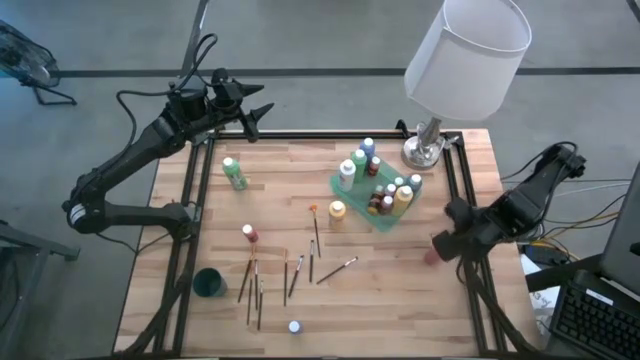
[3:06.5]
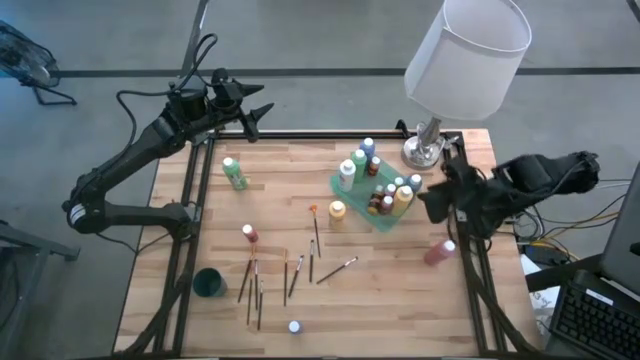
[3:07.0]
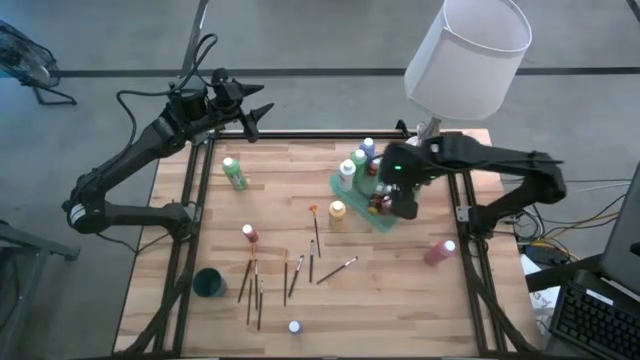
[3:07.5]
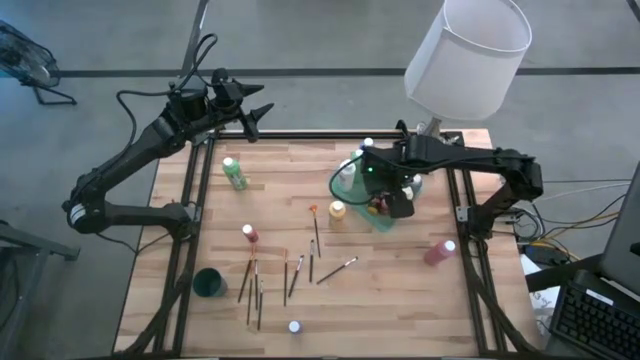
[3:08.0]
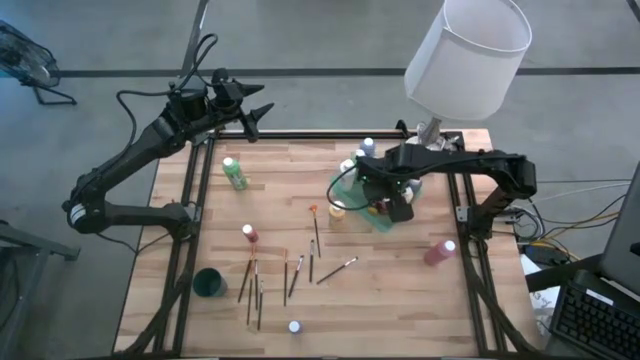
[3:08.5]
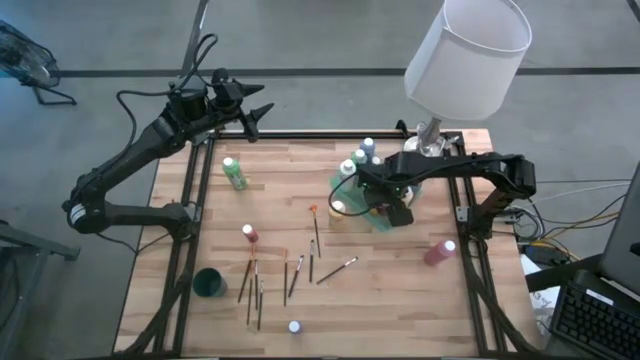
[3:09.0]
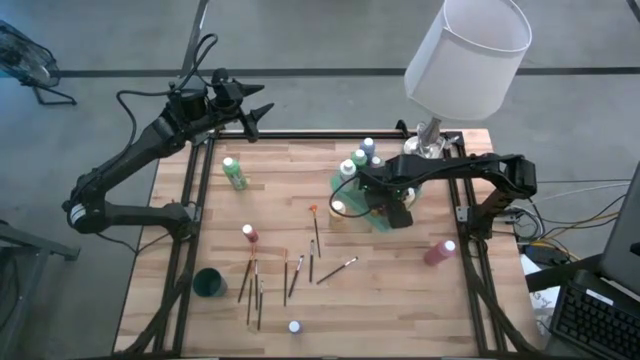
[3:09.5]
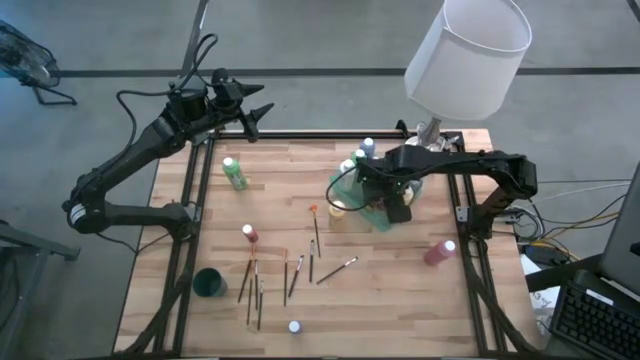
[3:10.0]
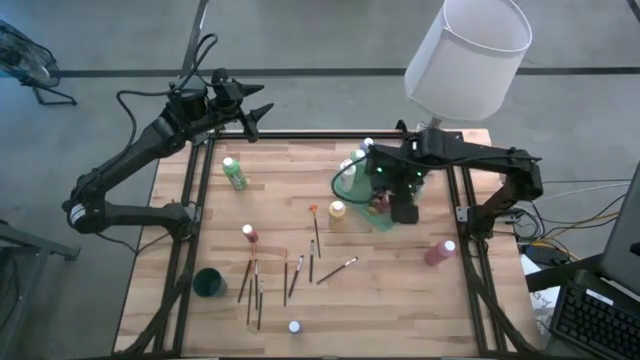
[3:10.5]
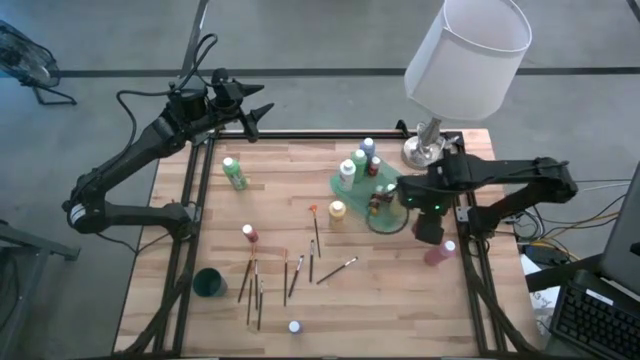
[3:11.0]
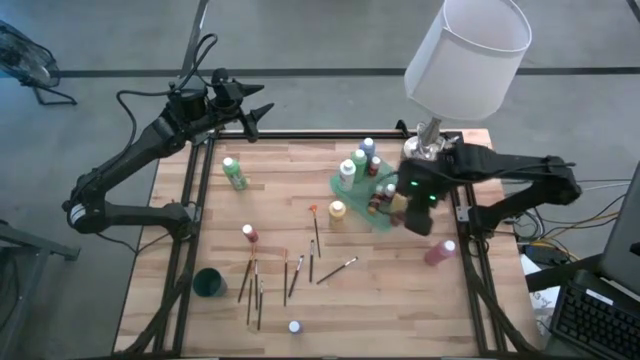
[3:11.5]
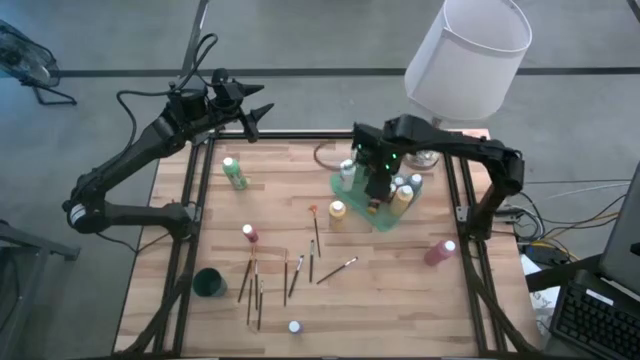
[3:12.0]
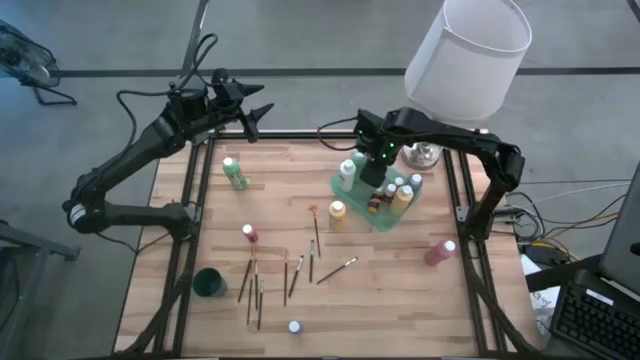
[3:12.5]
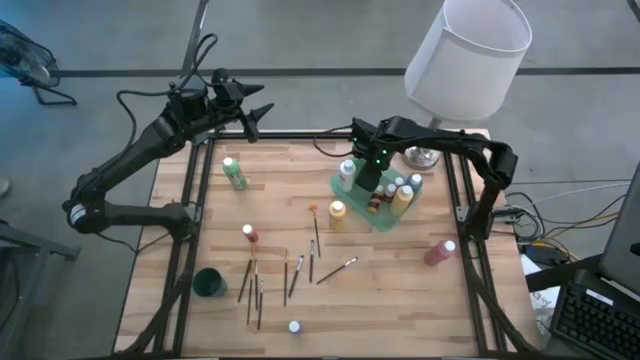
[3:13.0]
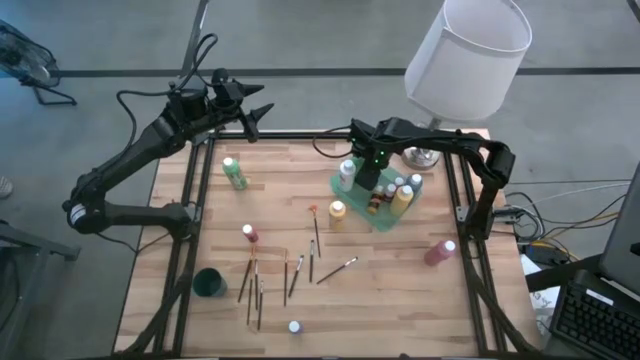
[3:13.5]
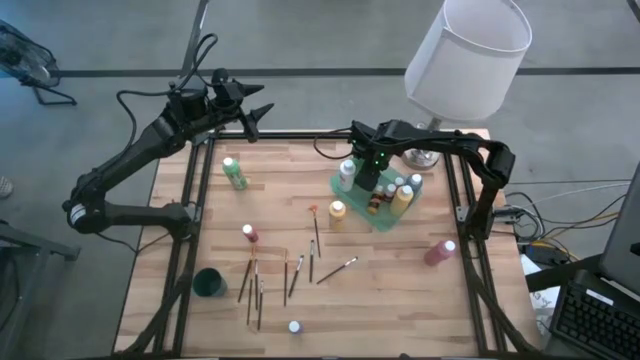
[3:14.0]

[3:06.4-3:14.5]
Task: Pick & Place Paint Supplies
Adjust the small red paint bottle in the green bin

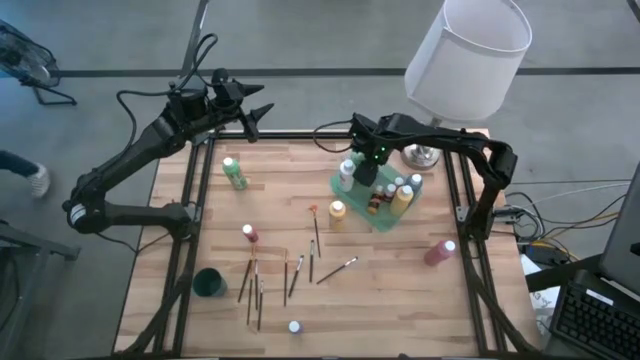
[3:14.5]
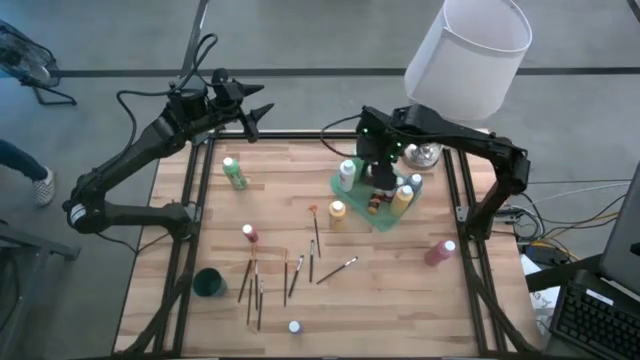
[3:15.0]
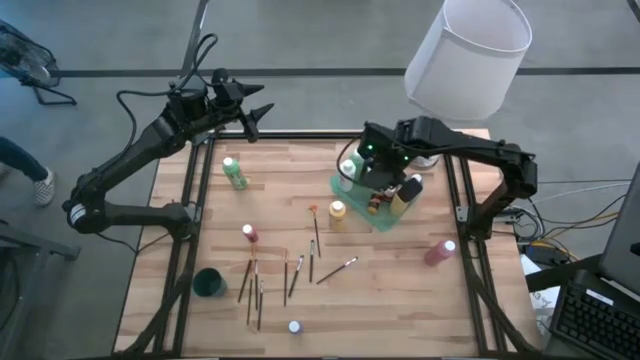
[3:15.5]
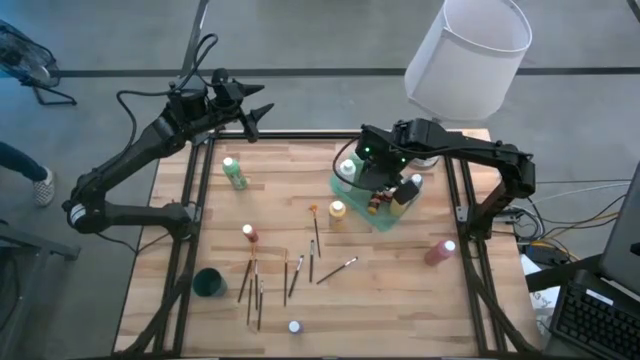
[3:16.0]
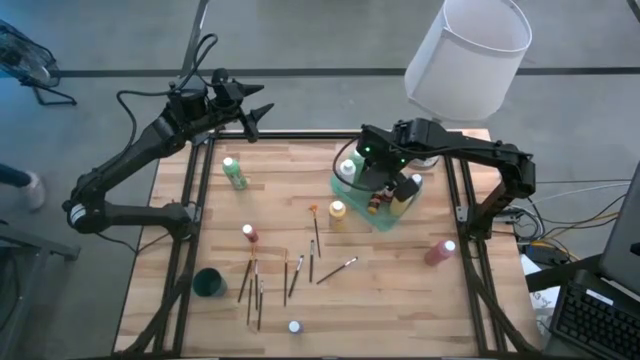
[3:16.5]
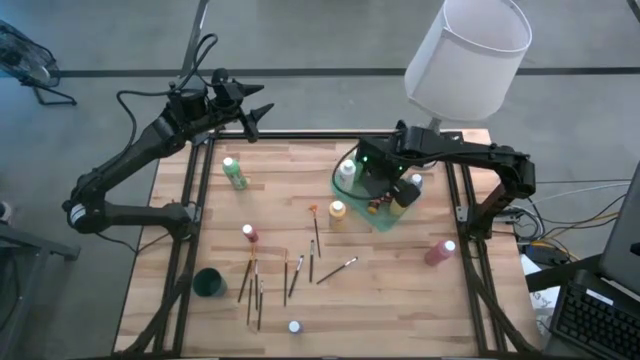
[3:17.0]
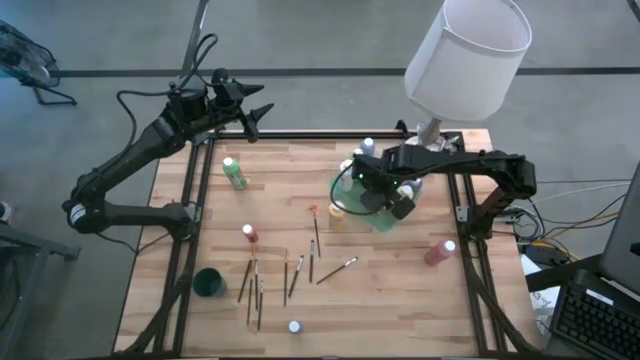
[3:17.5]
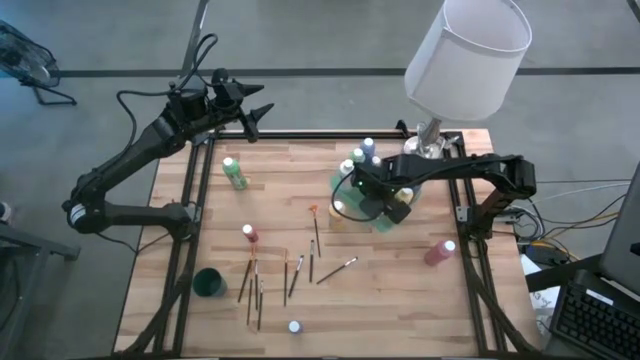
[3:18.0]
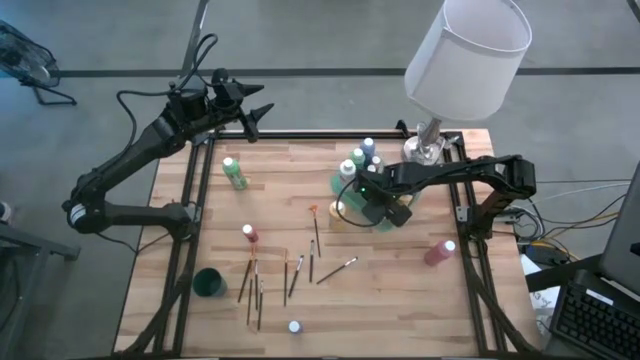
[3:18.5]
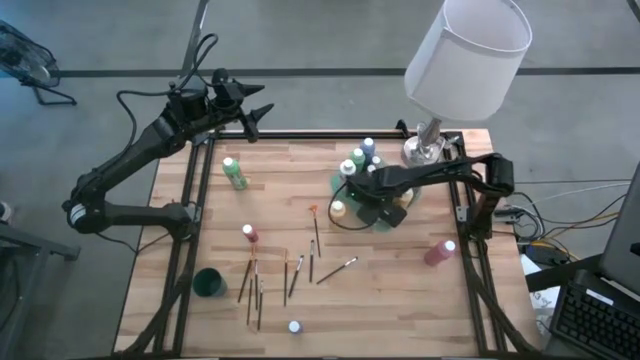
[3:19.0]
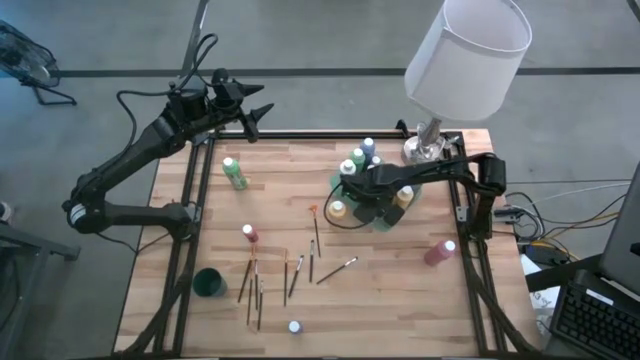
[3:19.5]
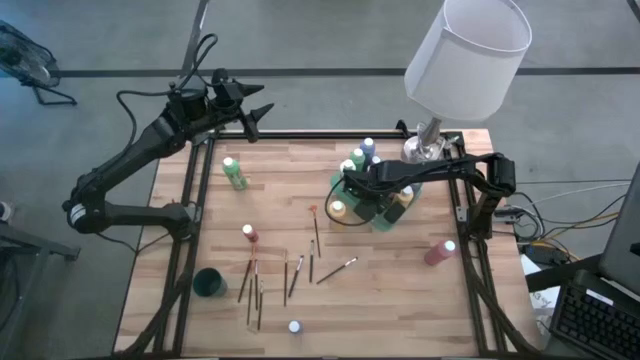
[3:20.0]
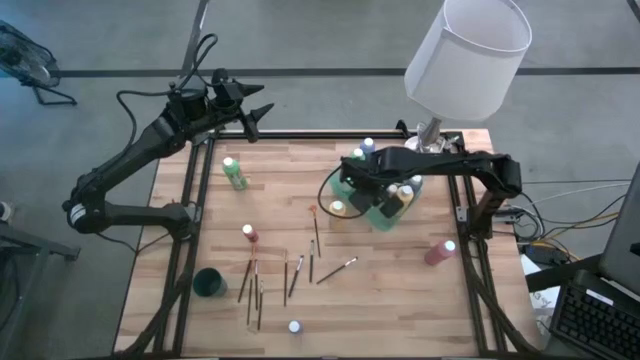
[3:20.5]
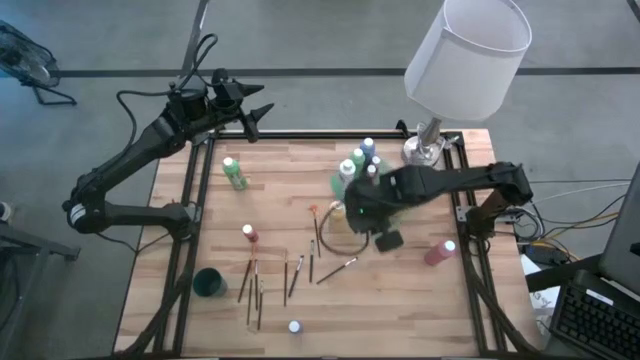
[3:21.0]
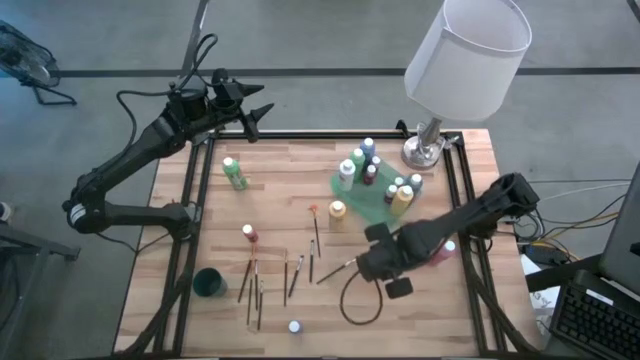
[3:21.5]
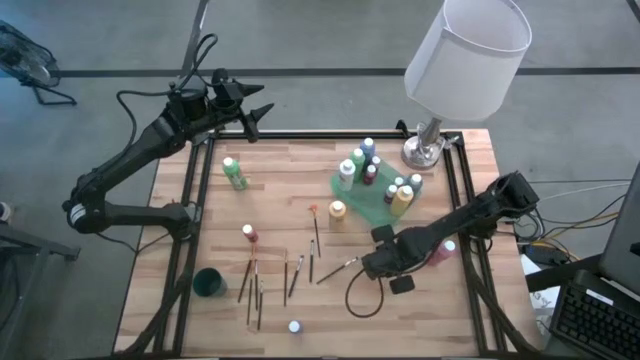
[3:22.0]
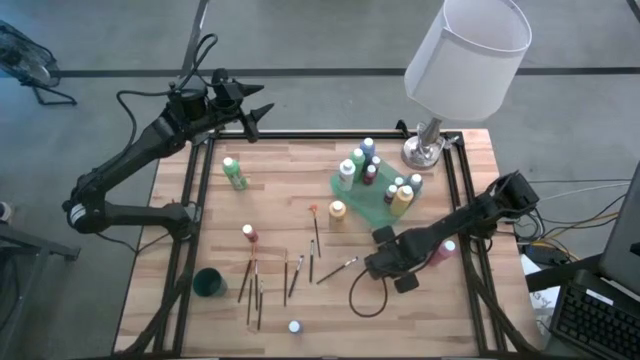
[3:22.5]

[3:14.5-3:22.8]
Remove the small yellow paint bottle from the green bin

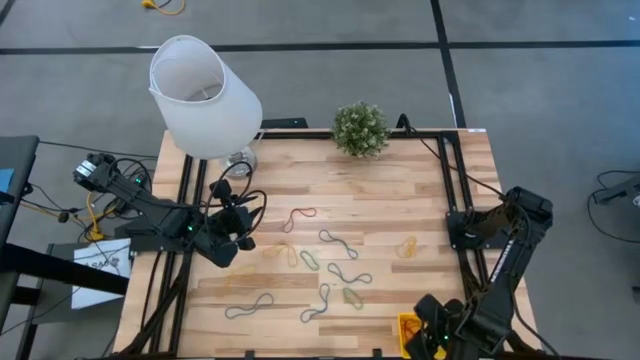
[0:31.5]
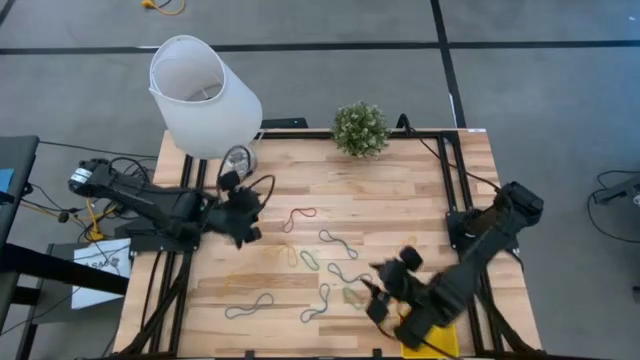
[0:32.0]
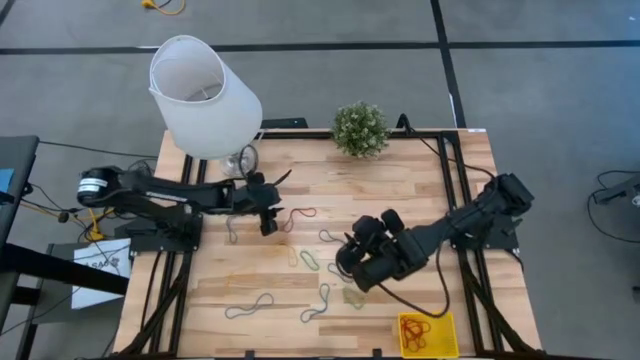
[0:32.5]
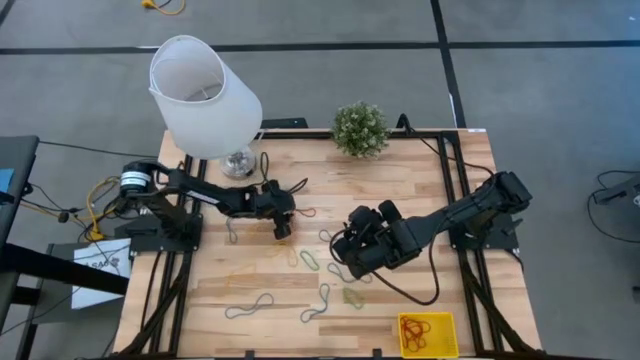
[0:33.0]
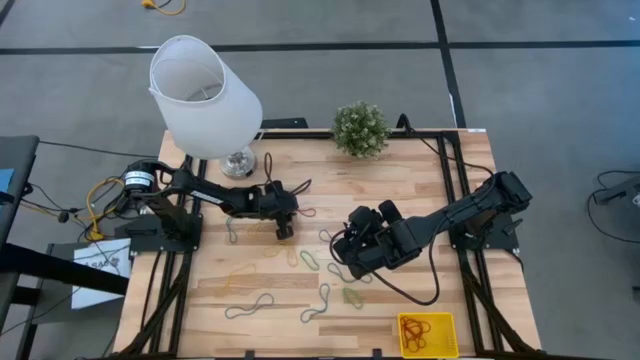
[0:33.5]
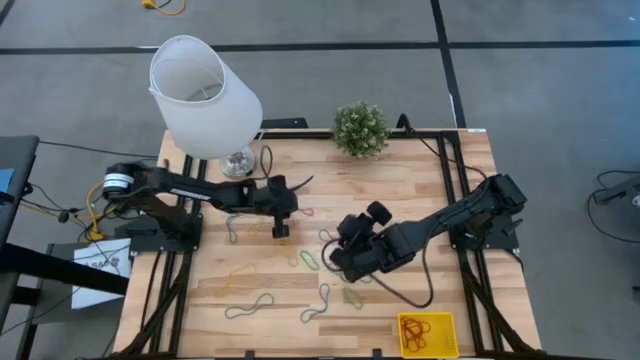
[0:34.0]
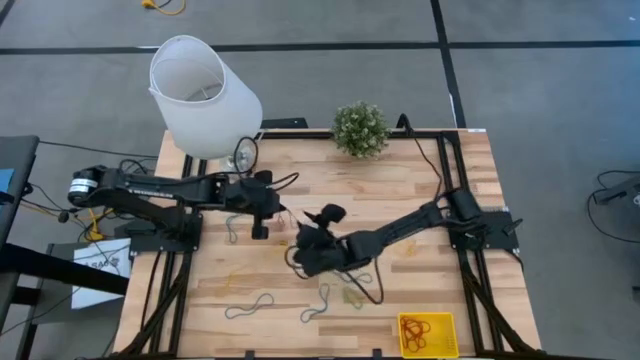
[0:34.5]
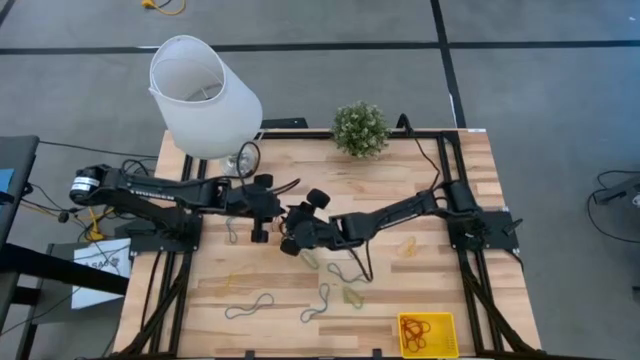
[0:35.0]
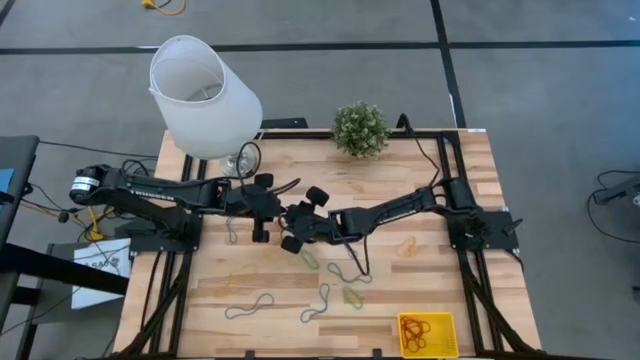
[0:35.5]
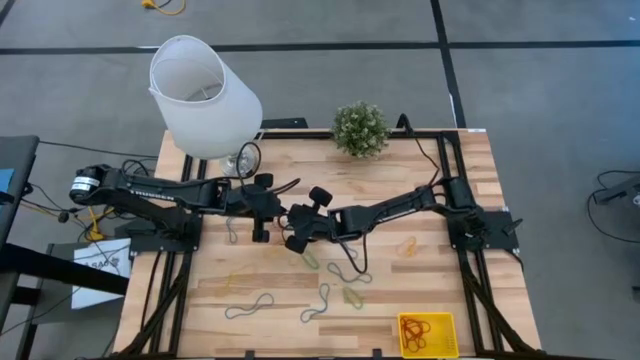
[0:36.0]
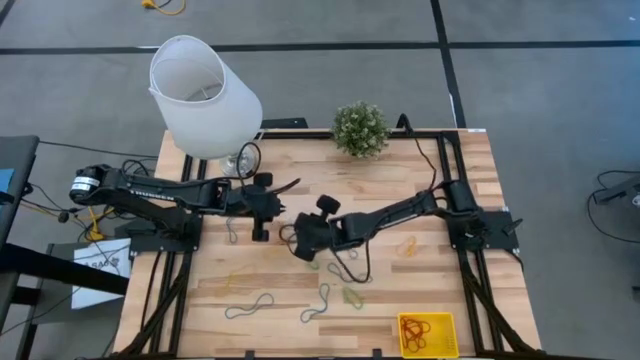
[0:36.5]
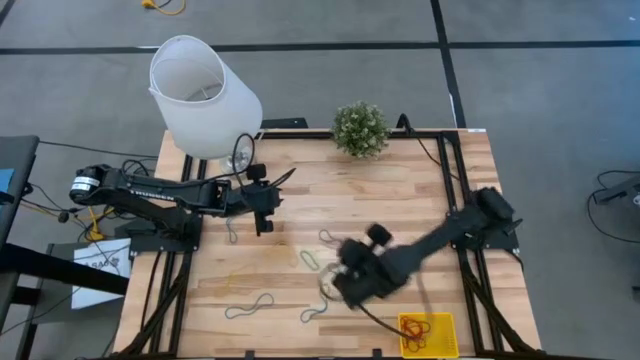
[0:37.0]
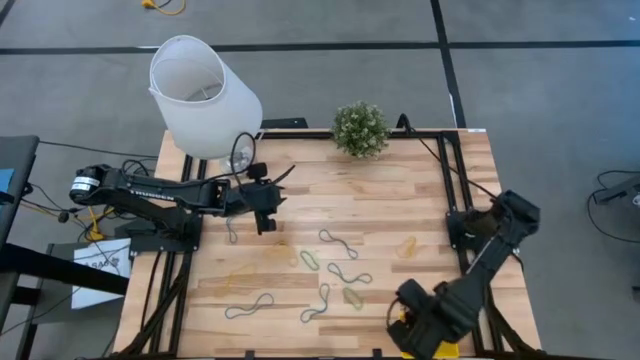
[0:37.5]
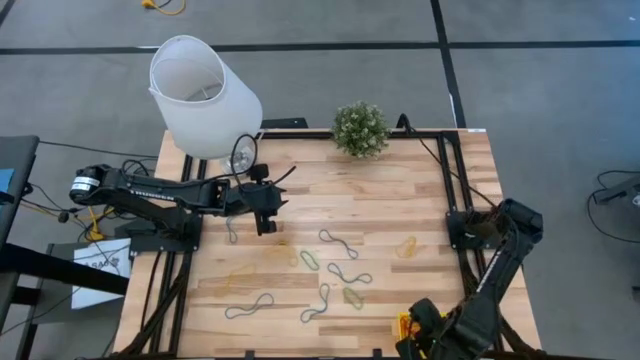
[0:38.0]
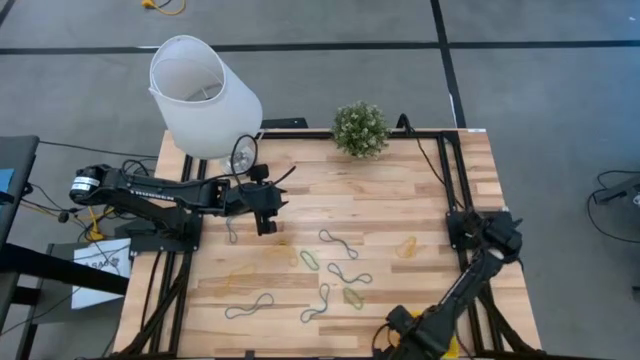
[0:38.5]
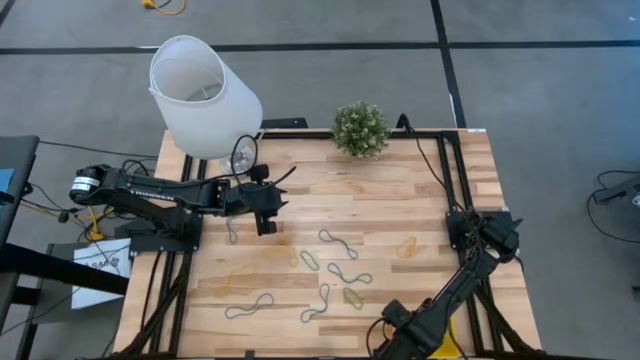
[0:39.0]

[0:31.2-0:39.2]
Task: Pick and place rubber bands into bin
Put the red rubber band into the yellow basket
